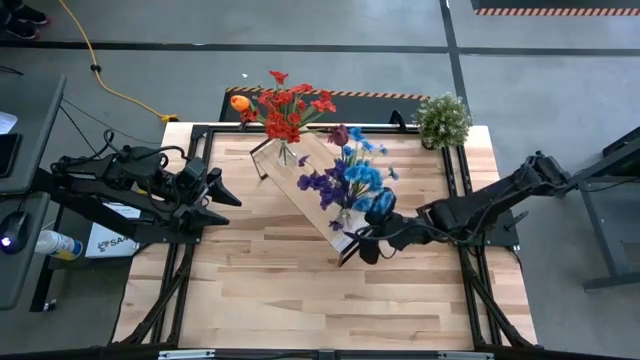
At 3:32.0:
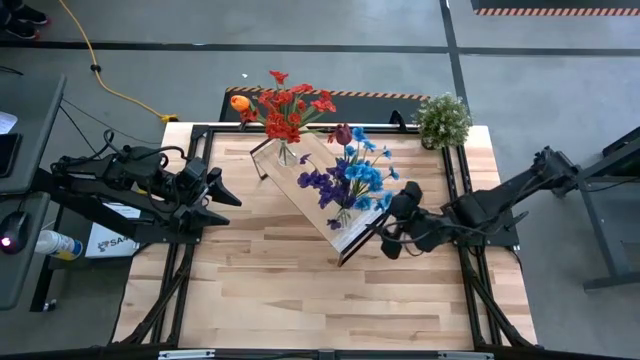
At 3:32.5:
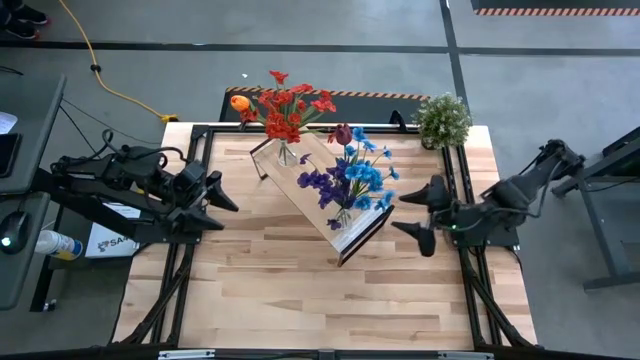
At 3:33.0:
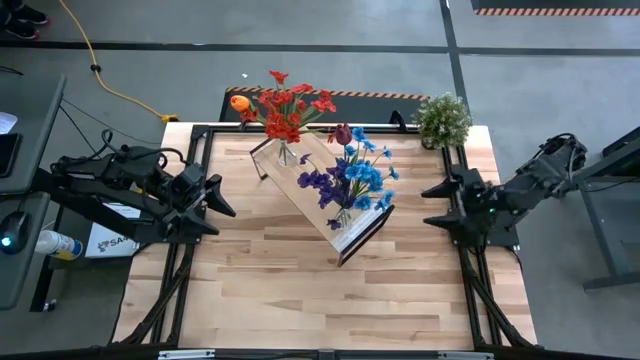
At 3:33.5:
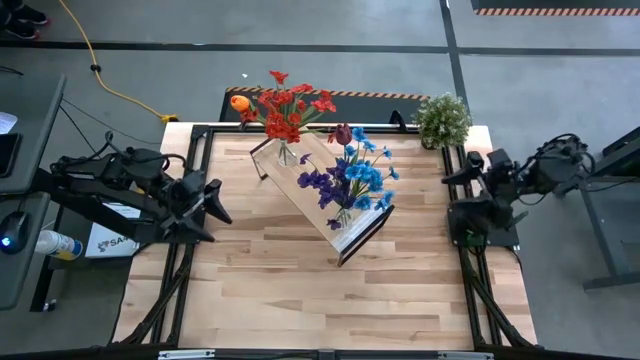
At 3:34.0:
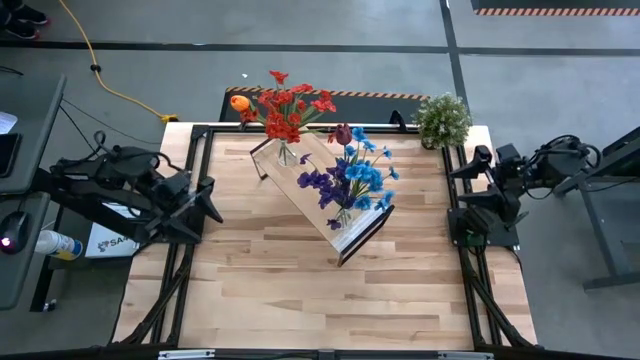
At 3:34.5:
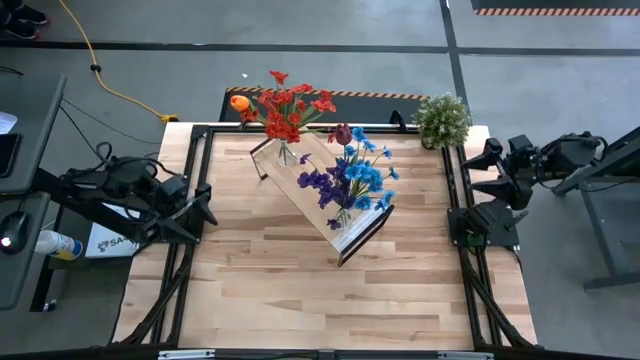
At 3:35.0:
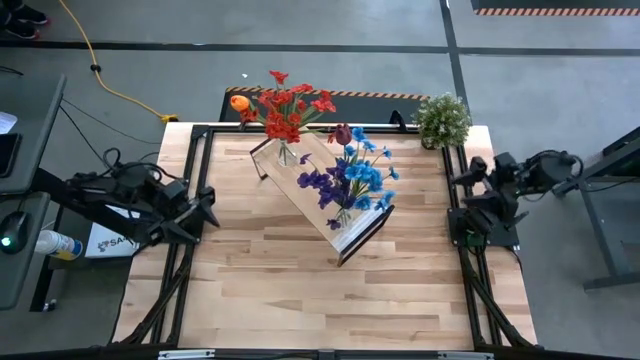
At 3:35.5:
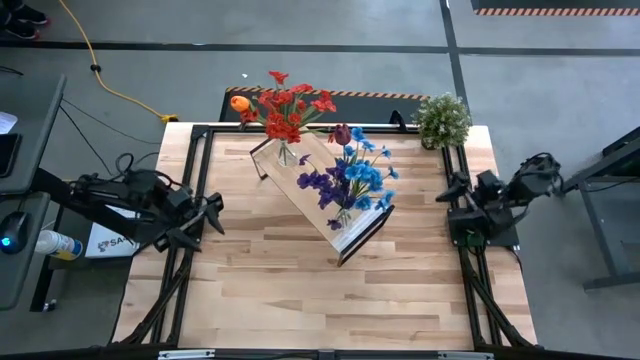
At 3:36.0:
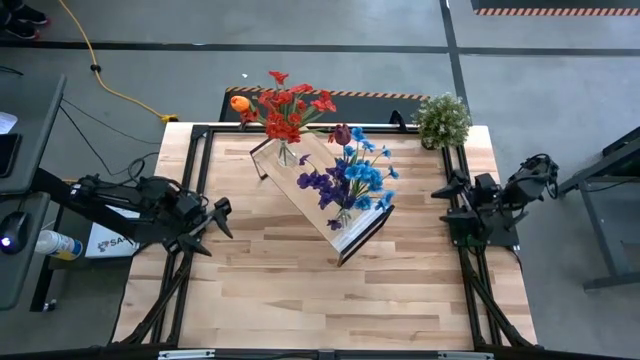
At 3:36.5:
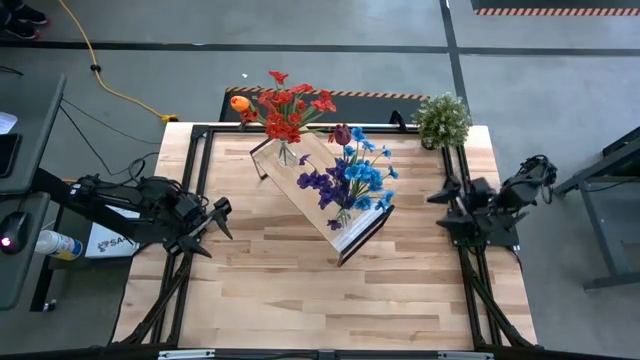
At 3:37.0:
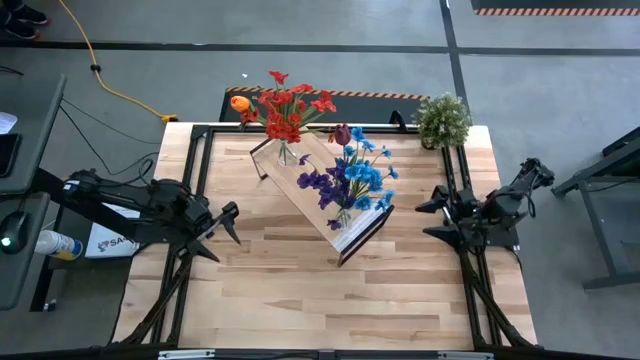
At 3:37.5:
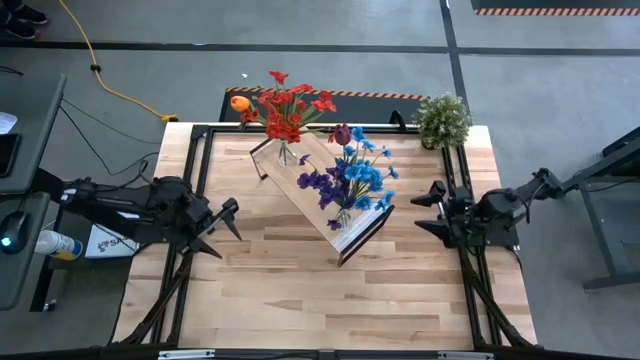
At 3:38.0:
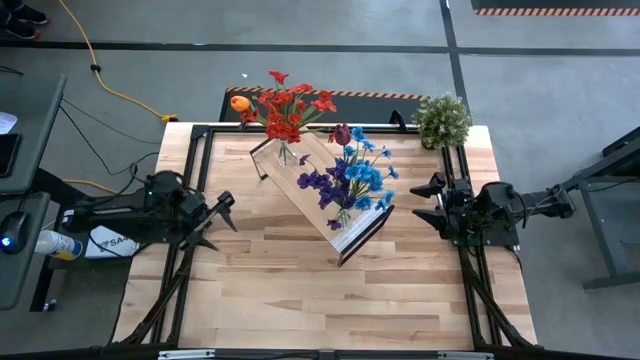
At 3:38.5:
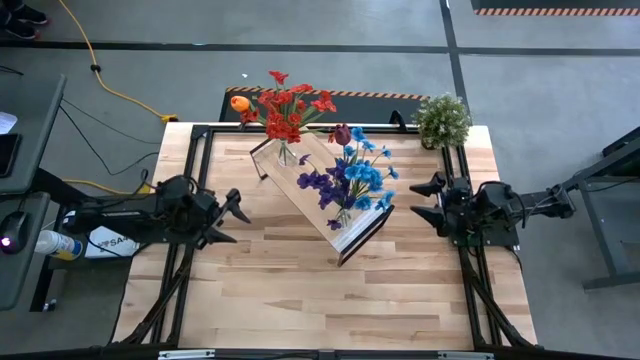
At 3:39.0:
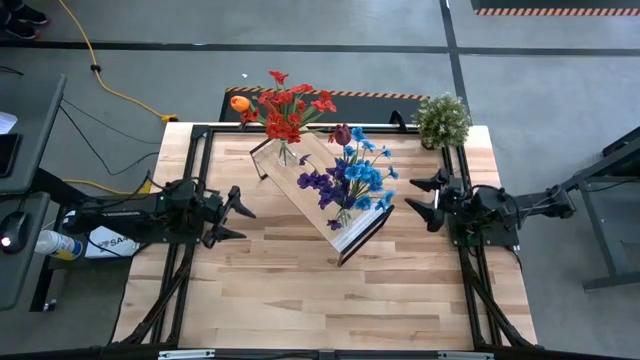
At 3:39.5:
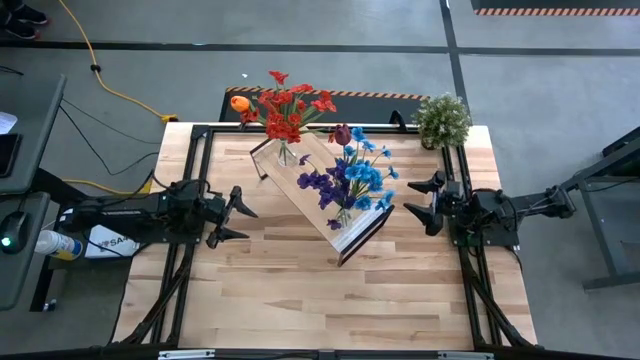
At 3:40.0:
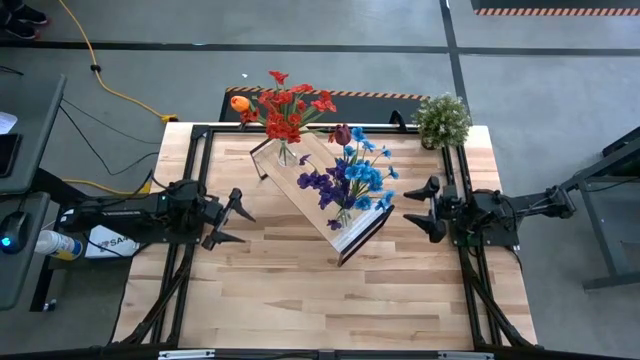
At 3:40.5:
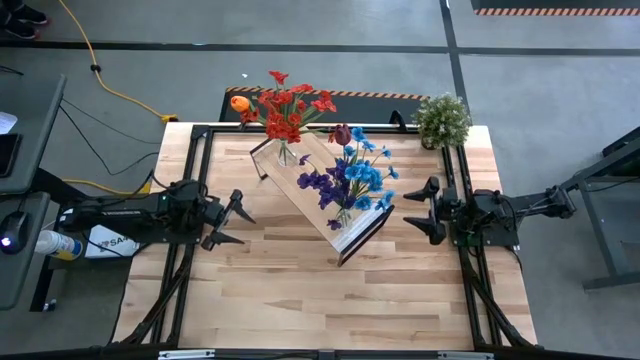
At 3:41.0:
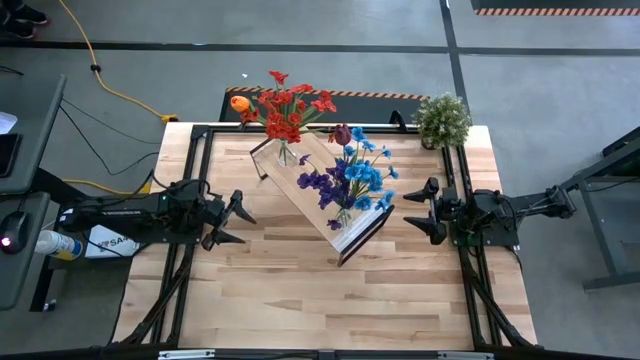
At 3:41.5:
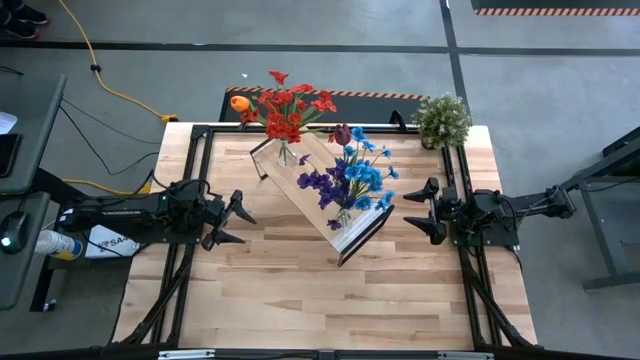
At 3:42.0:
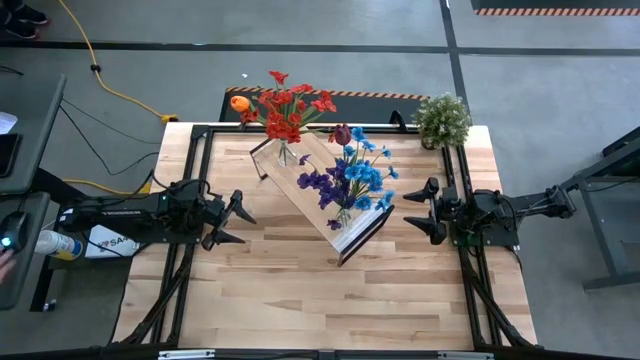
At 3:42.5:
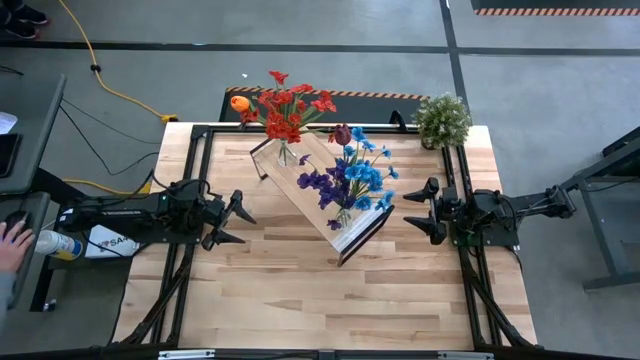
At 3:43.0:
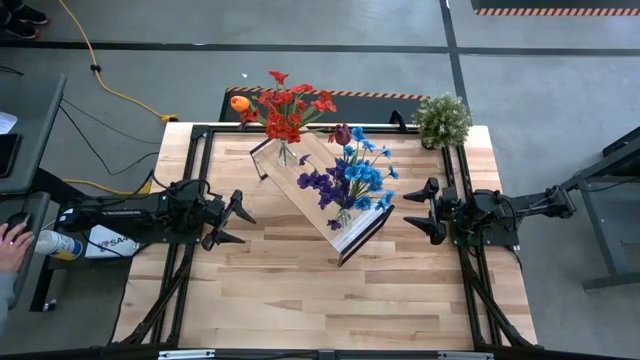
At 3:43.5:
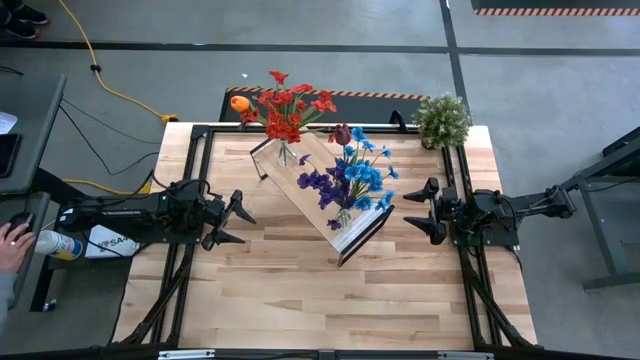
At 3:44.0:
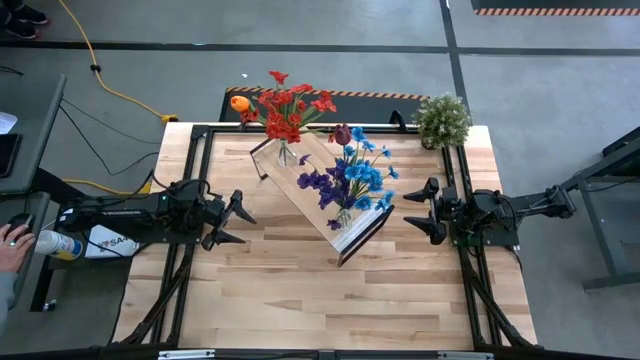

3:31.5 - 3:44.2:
Task: Pick and place flowers into a vace then onto a shelf
Return to Home Position

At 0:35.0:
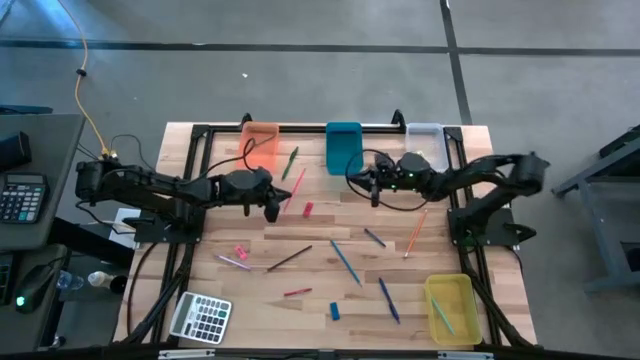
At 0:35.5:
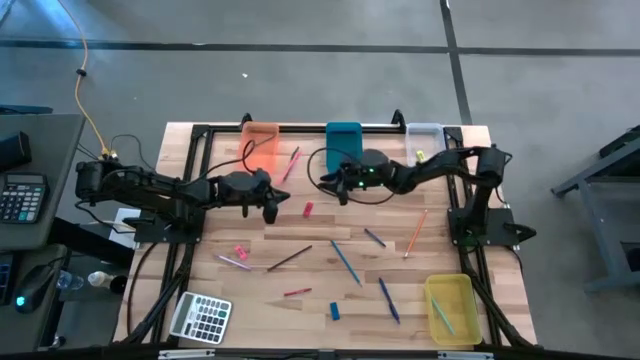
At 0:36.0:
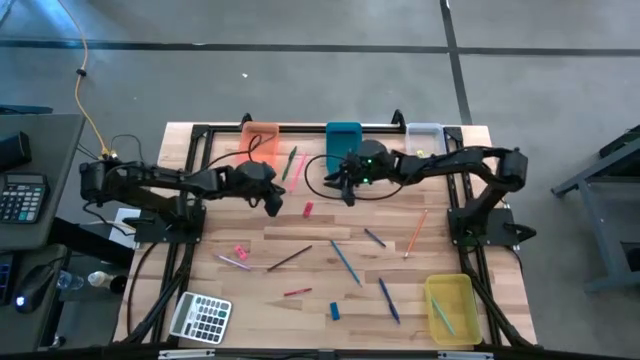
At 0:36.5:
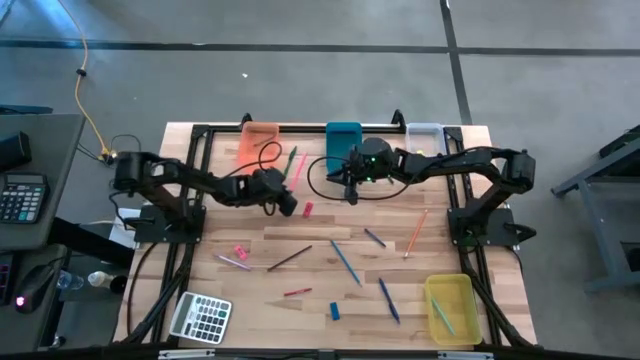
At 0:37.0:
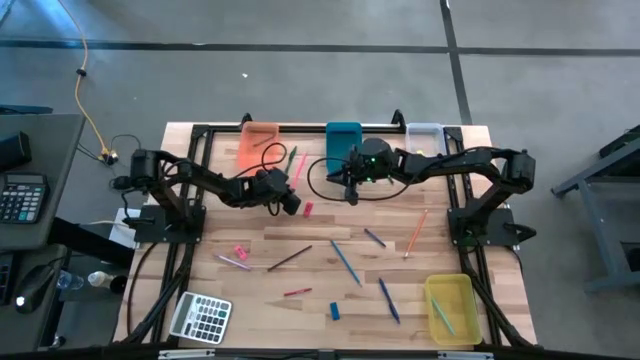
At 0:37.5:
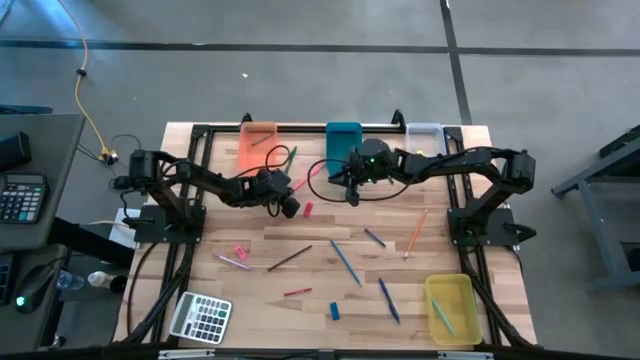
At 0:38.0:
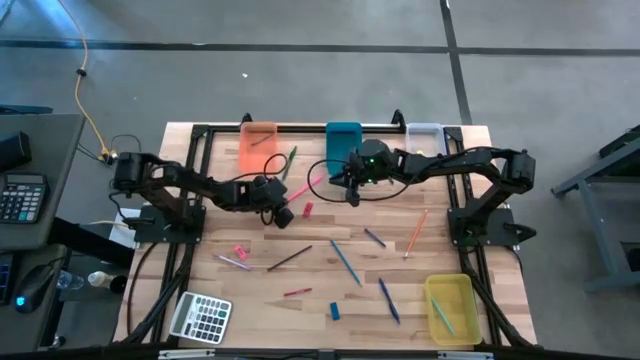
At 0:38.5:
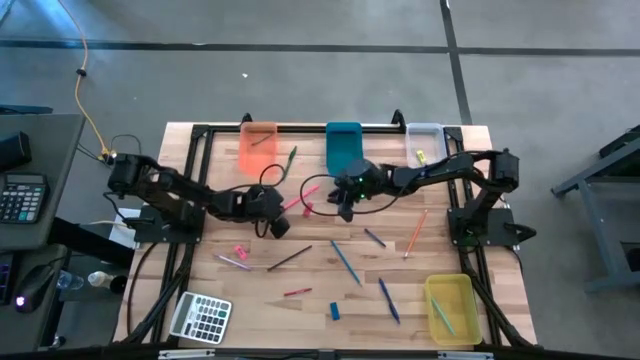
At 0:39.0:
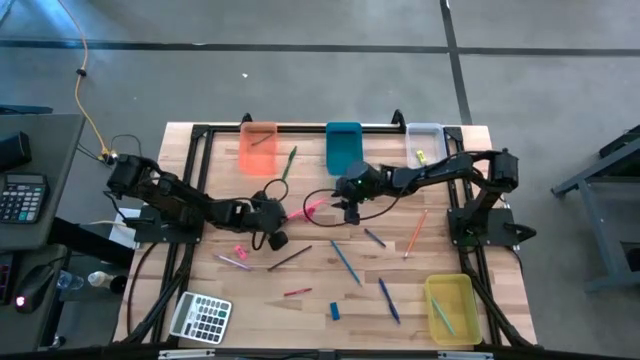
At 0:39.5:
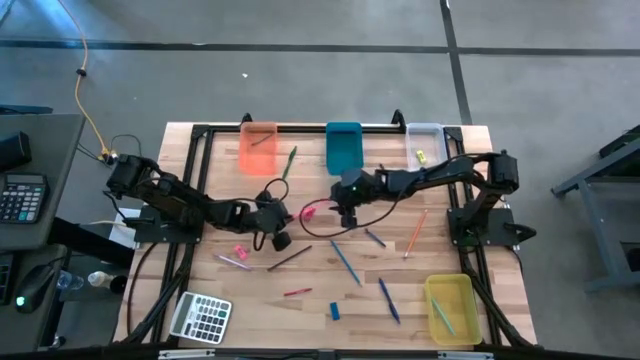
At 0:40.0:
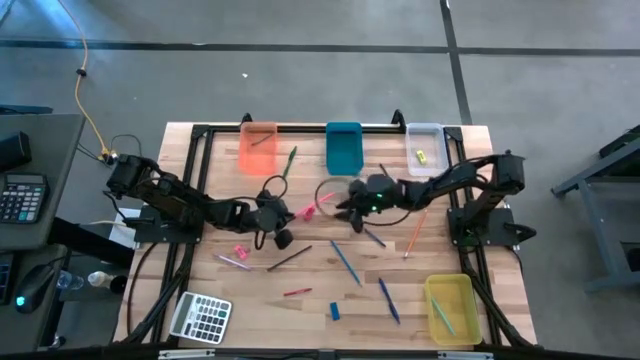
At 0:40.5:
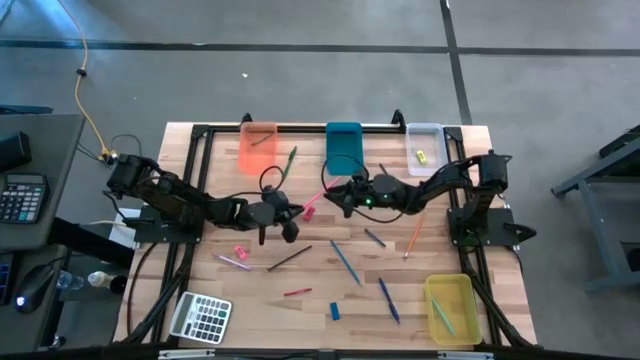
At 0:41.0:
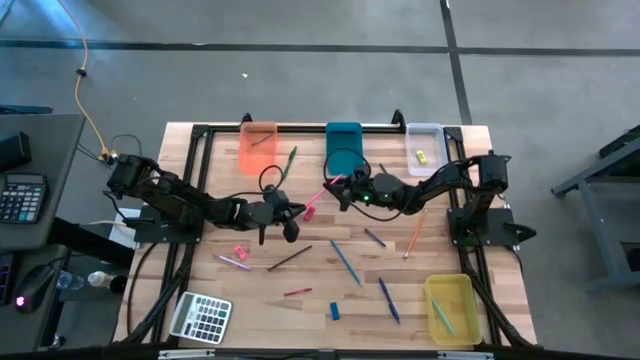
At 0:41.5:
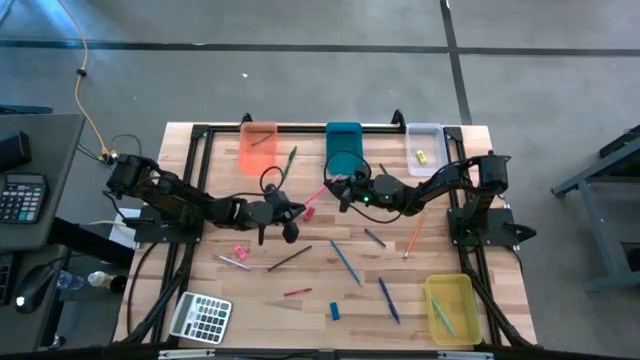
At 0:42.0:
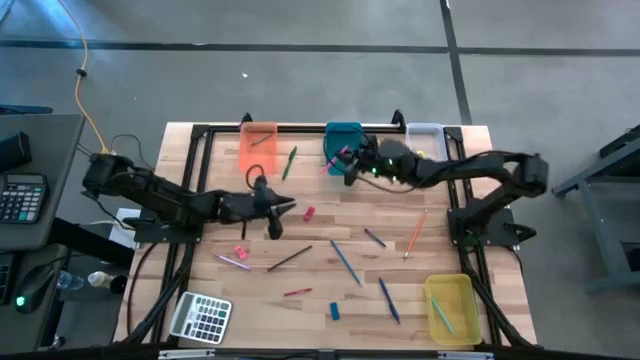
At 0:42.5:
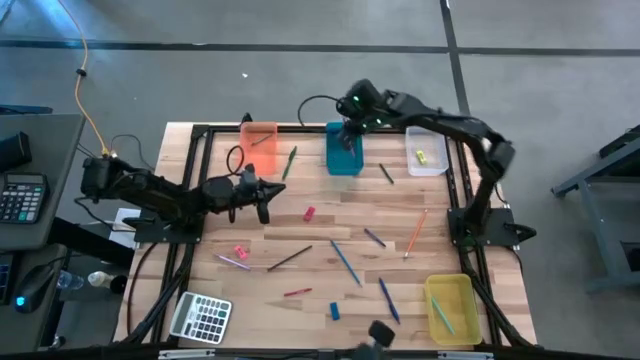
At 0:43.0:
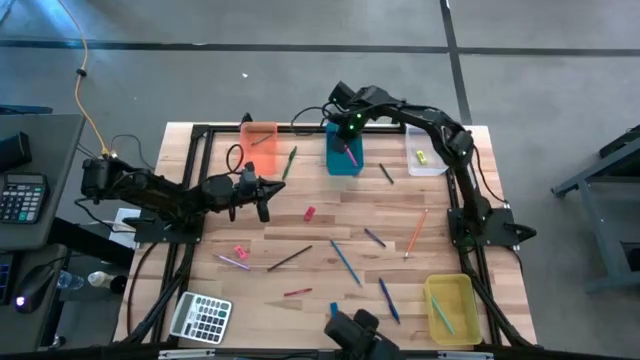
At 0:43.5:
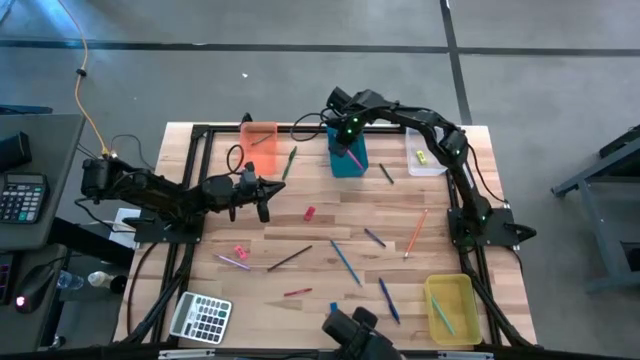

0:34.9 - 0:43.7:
Task: Sort crayons/erasers/pens/pencils in bins
Put the pink pencil into the blue bin

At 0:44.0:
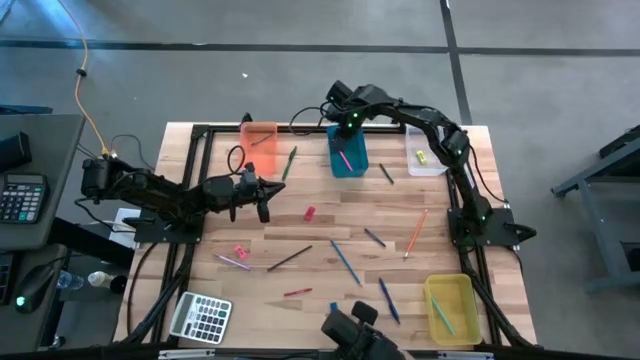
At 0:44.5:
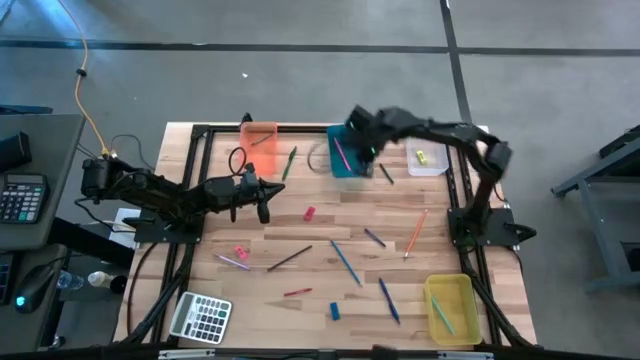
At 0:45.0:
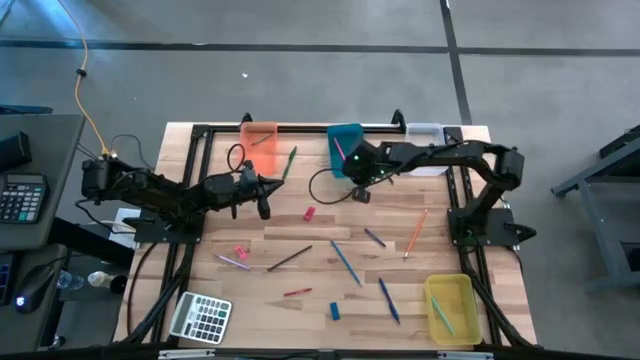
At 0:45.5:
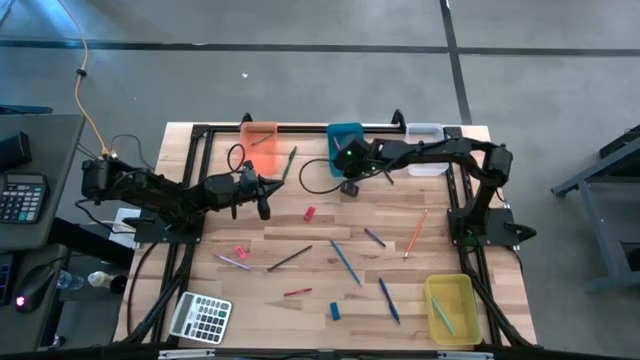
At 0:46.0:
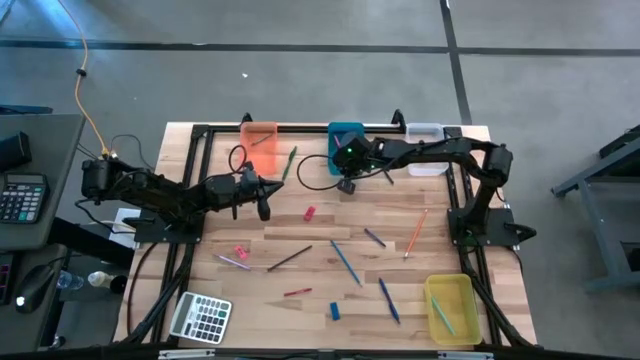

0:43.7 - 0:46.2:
Adjust the blue bin
